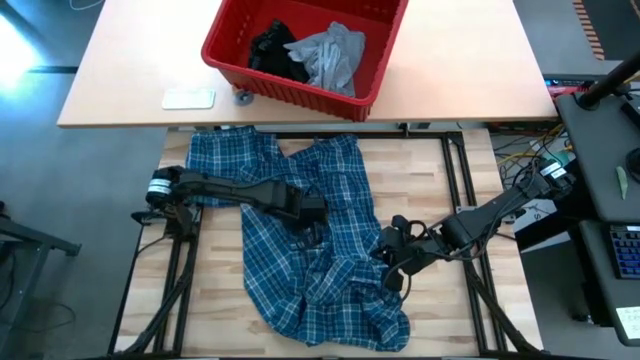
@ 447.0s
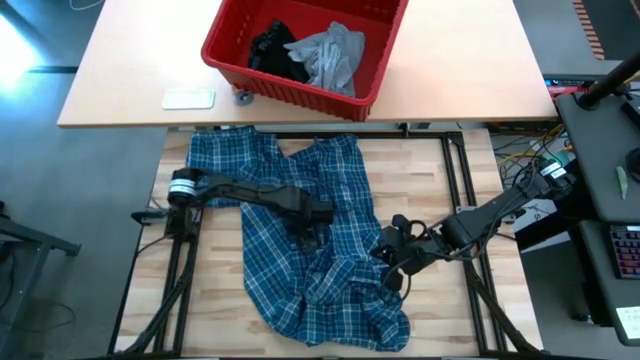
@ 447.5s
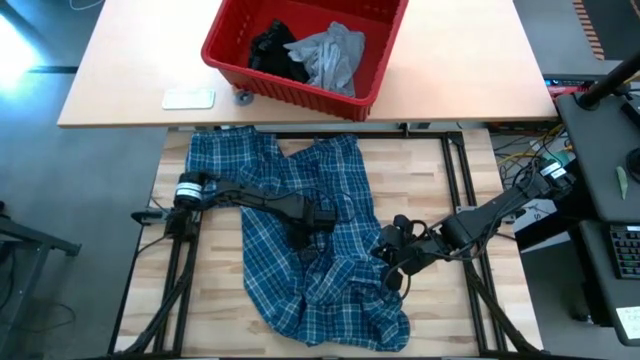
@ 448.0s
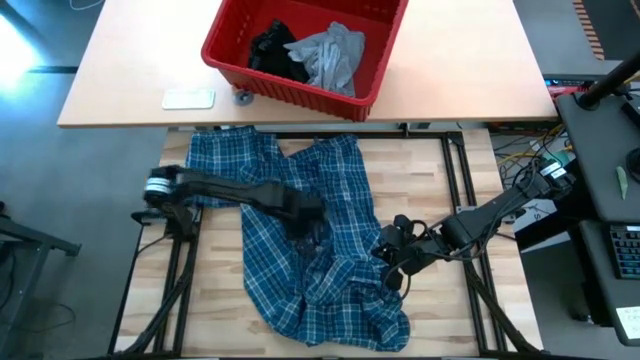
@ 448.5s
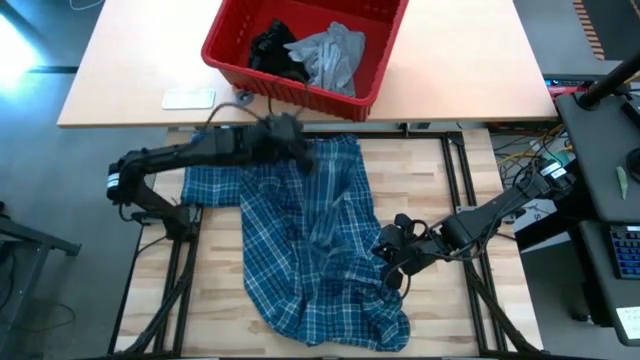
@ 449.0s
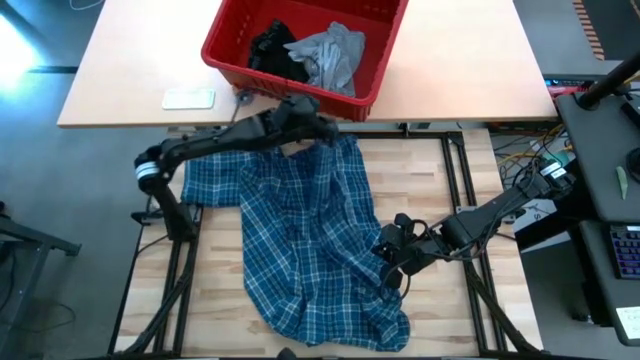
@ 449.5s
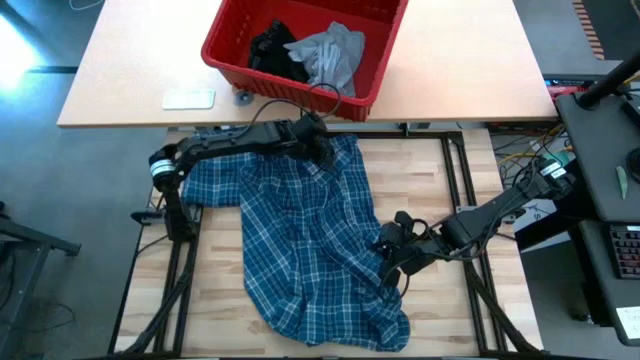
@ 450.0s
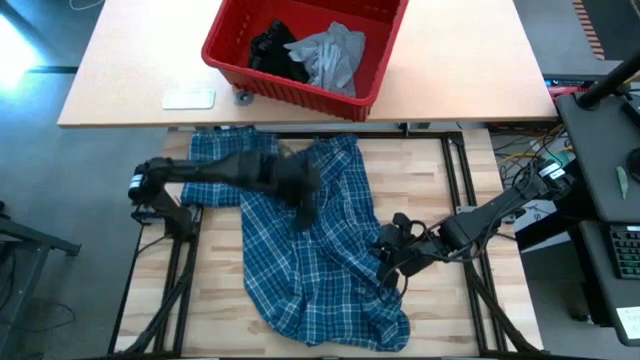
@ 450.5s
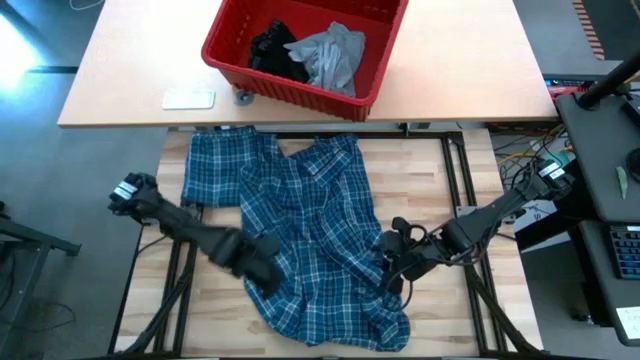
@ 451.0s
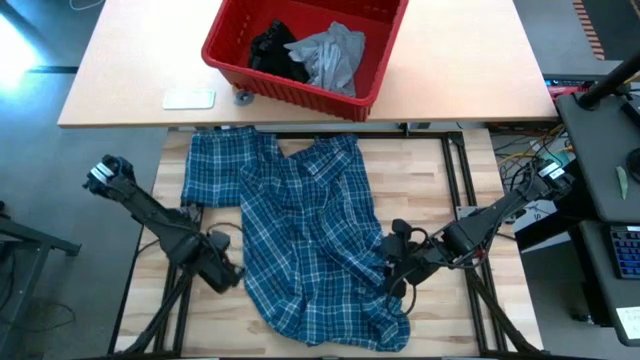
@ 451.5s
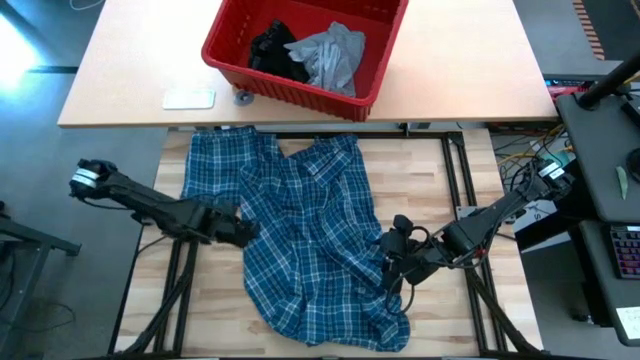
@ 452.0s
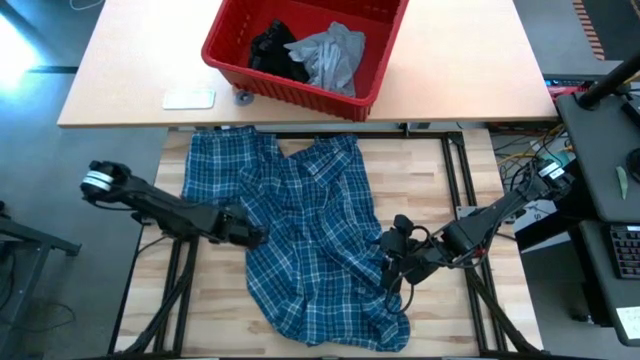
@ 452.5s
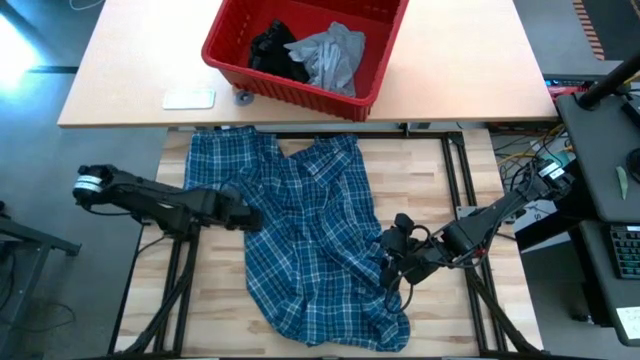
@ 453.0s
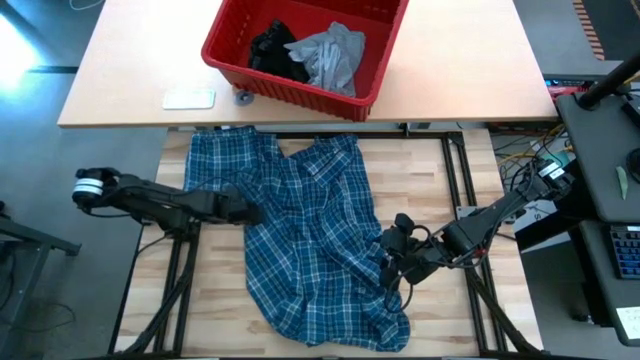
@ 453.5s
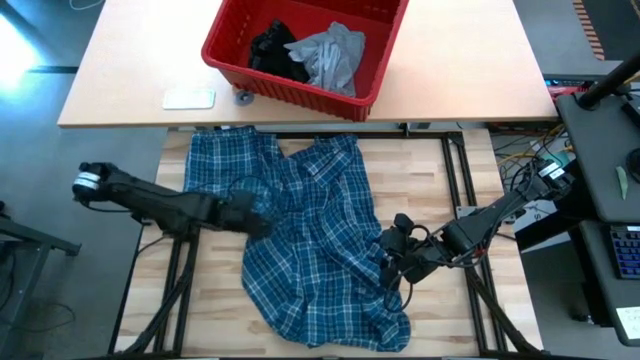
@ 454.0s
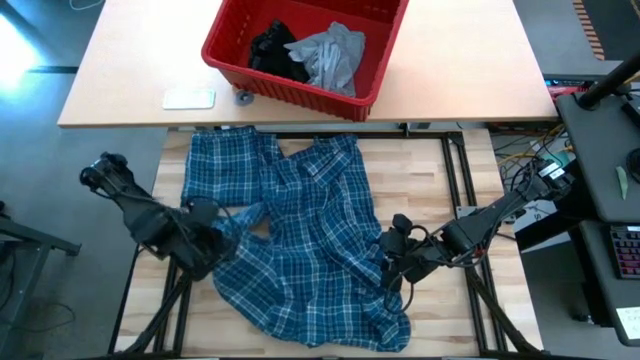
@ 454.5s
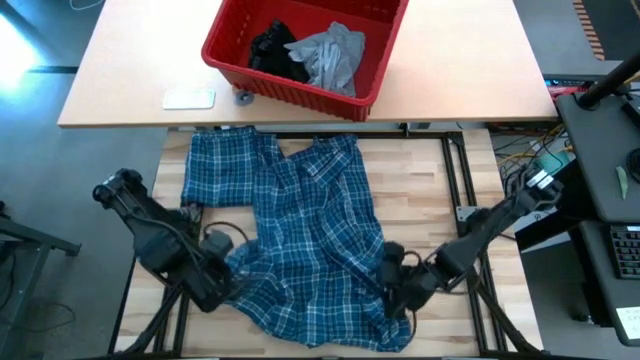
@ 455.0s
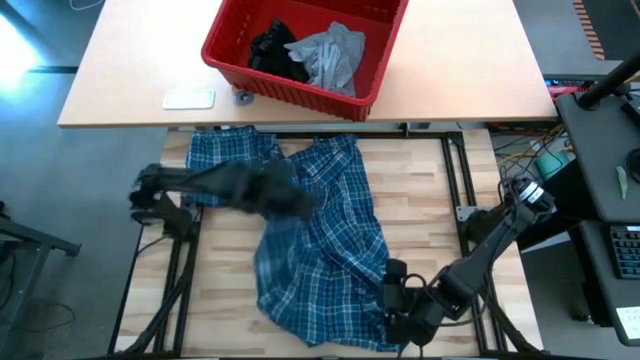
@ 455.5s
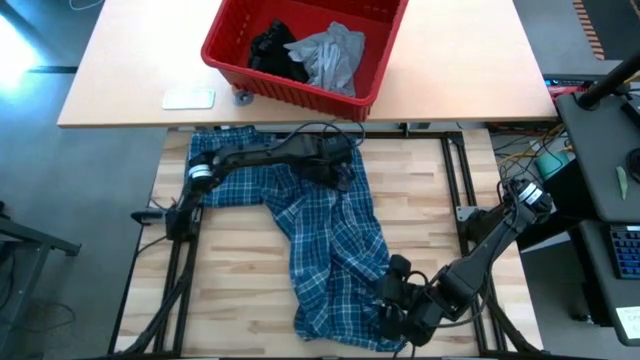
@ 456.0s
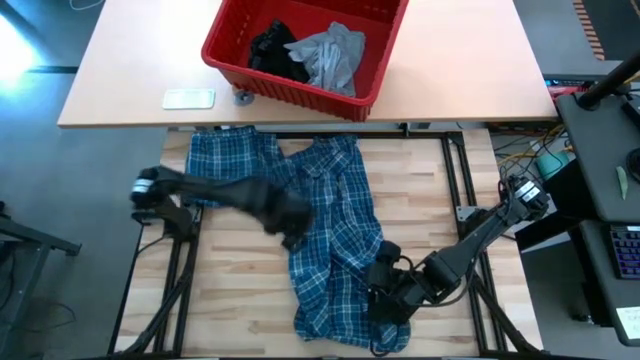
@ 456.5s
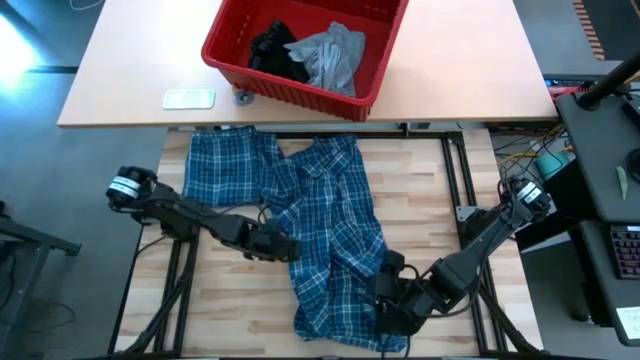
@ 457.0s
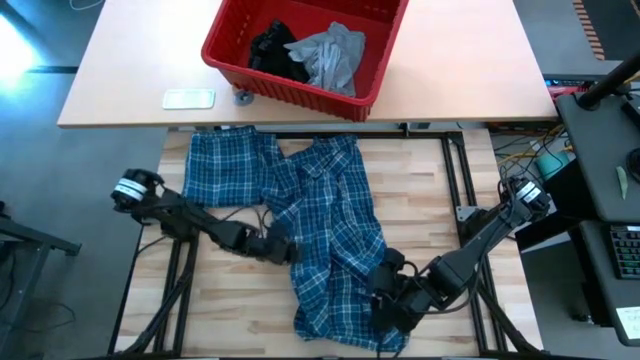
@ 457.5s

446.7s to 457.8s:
Task: Fold Laundry from Bin
Fold the blue patterned long sleeve shirt

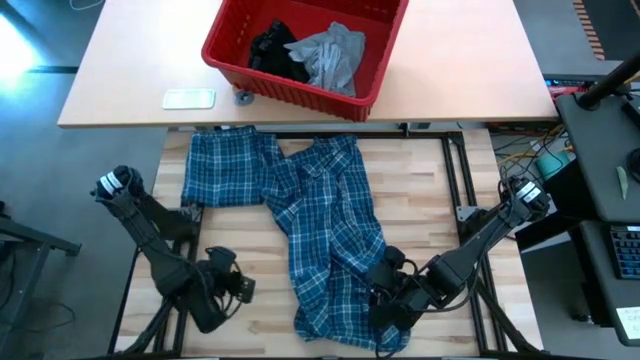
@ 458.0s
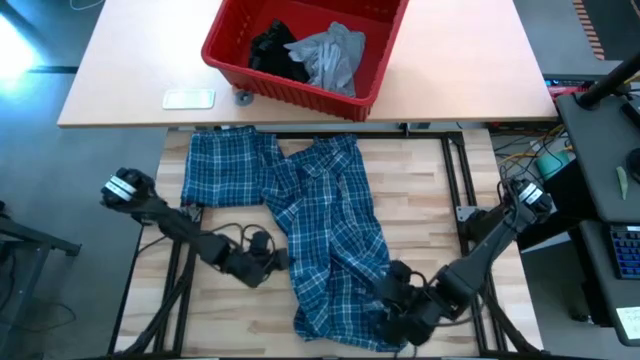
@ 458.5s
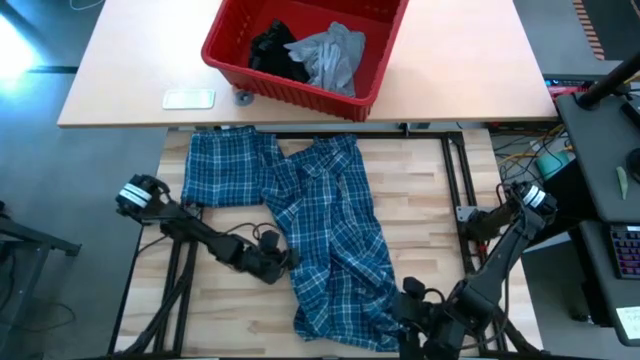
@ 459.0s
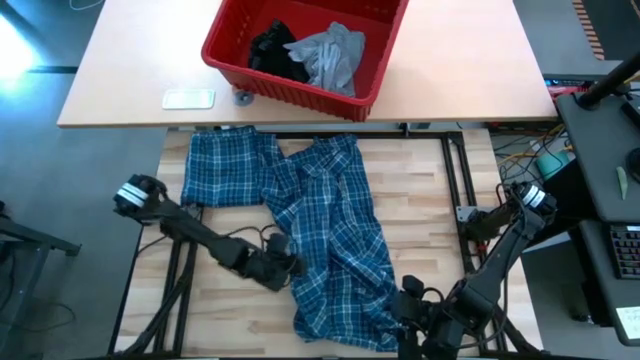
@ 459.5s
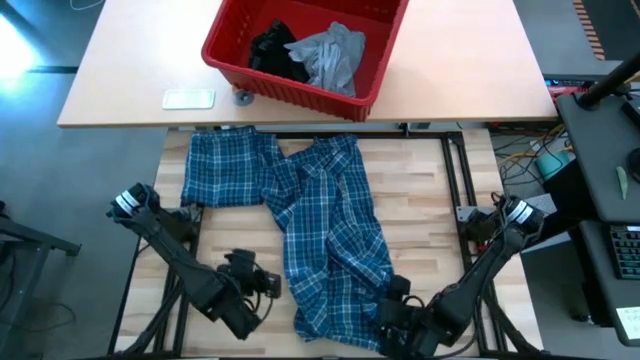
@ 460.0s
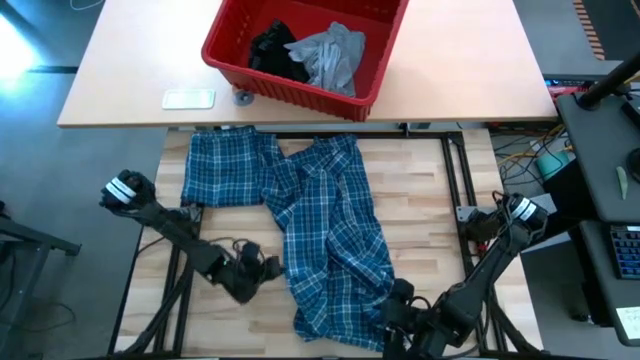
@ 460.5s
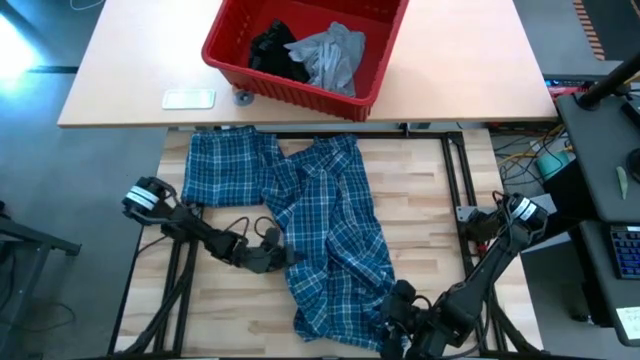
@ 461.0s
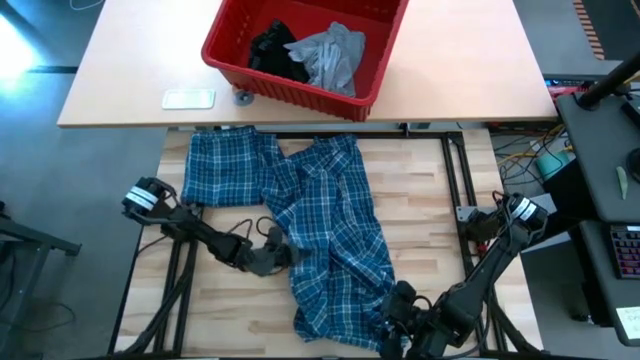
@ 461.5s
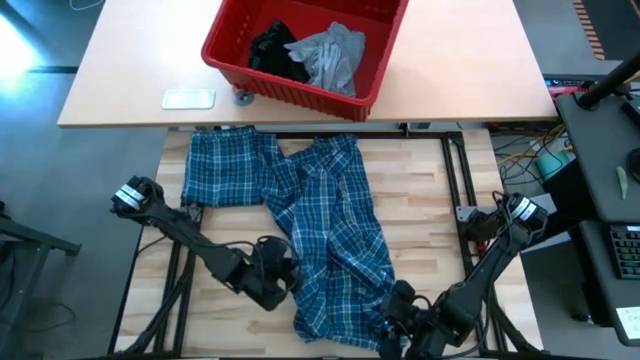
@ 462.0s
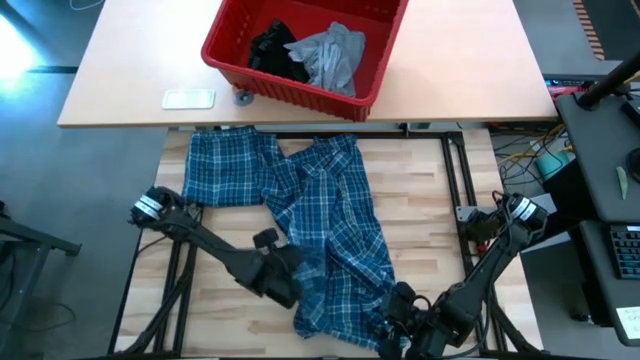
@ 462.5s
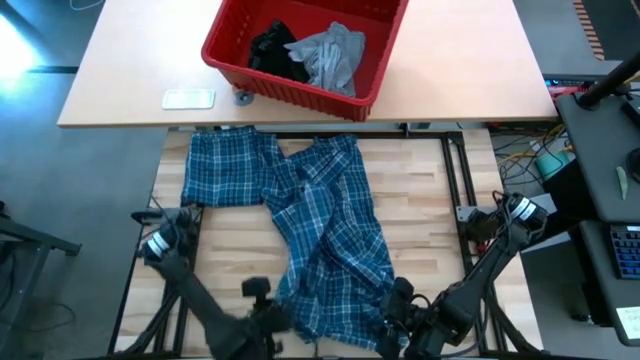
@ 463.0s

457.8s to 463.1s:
Fold the blue patterned long sleeve shirt

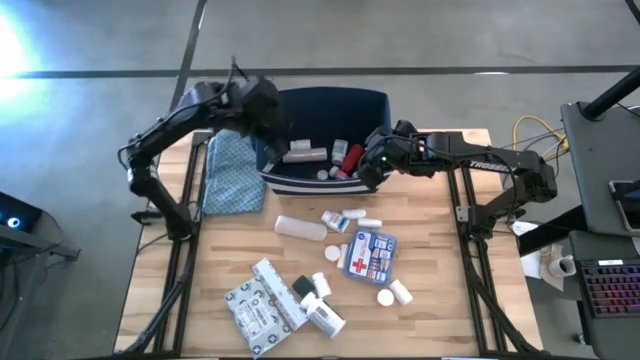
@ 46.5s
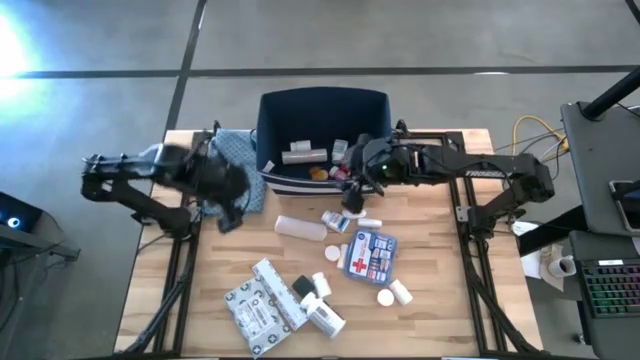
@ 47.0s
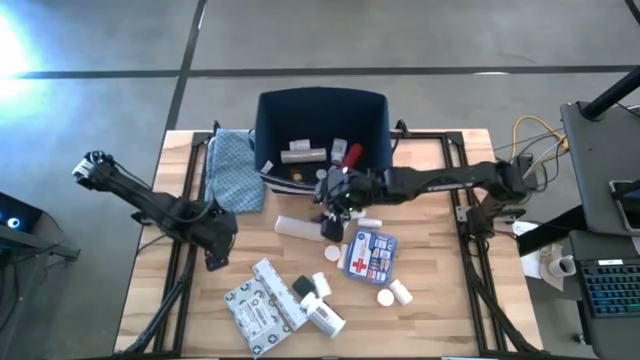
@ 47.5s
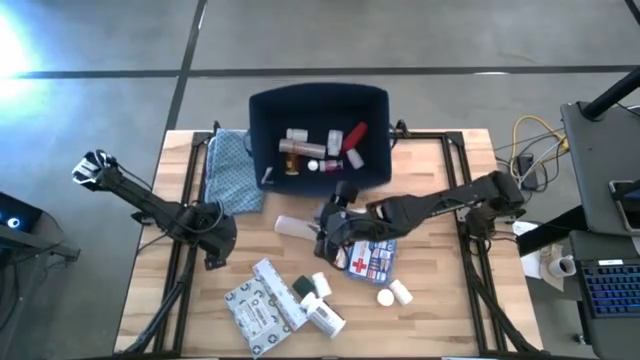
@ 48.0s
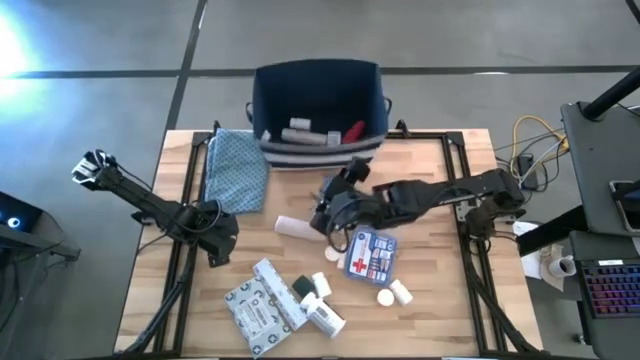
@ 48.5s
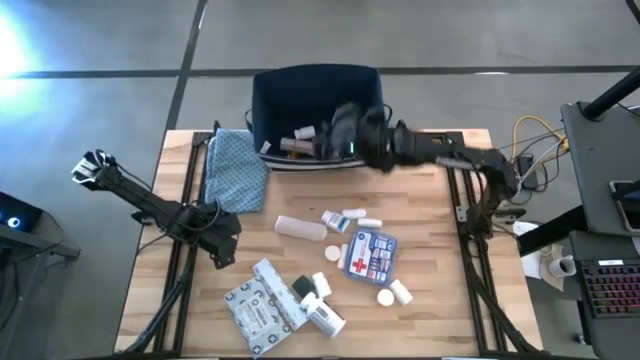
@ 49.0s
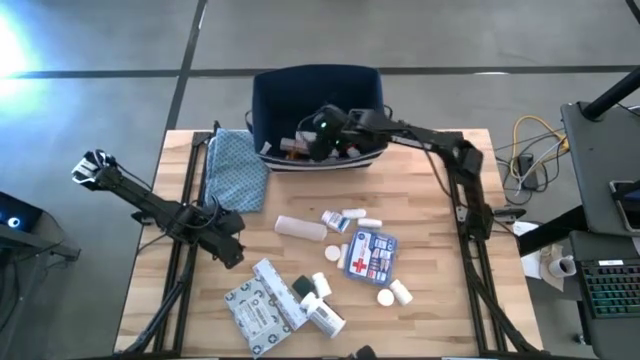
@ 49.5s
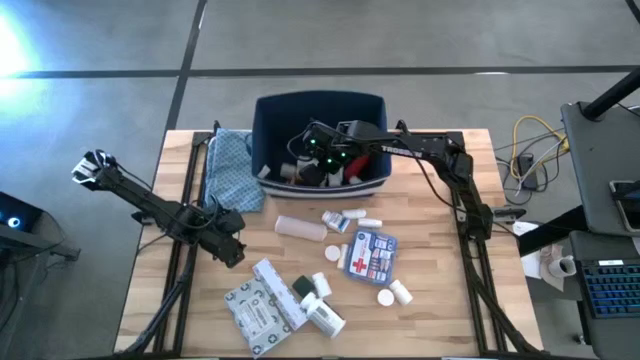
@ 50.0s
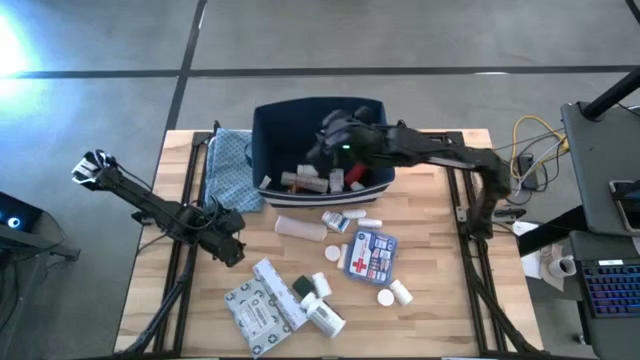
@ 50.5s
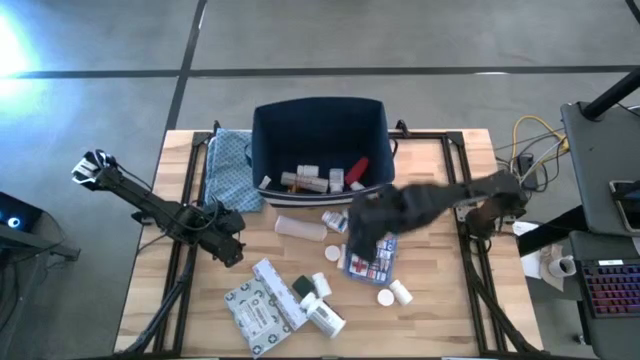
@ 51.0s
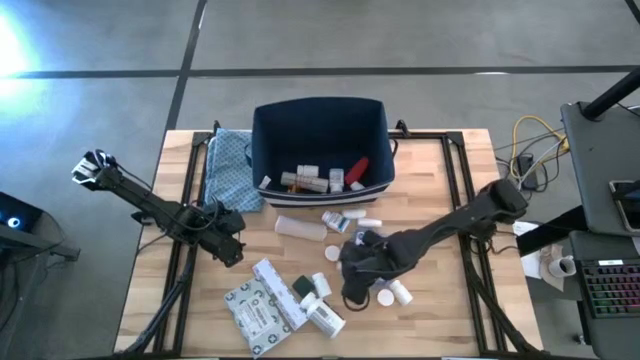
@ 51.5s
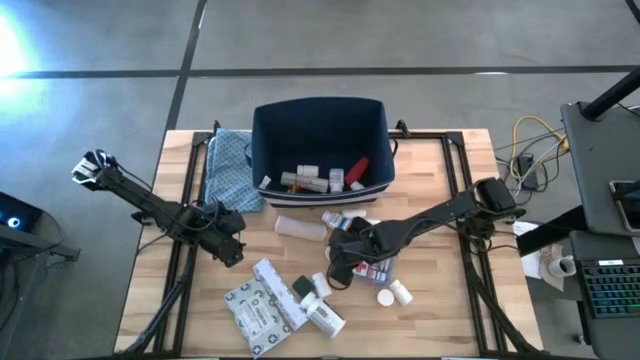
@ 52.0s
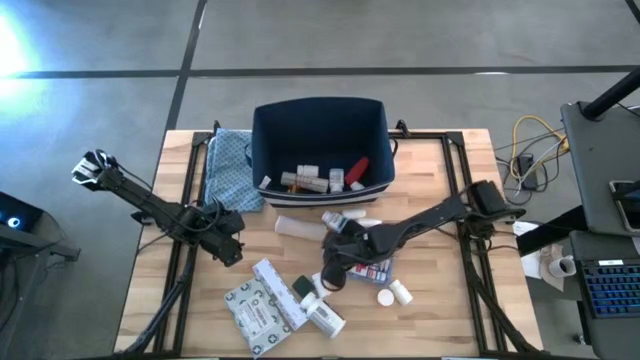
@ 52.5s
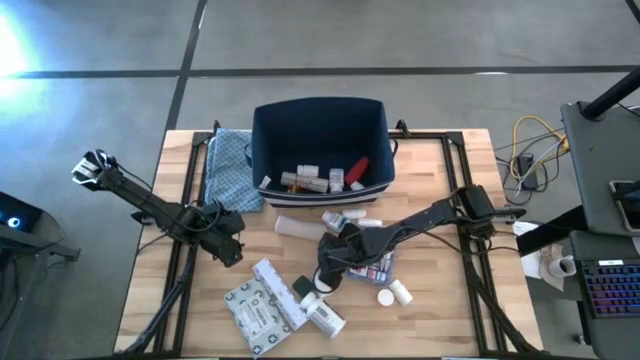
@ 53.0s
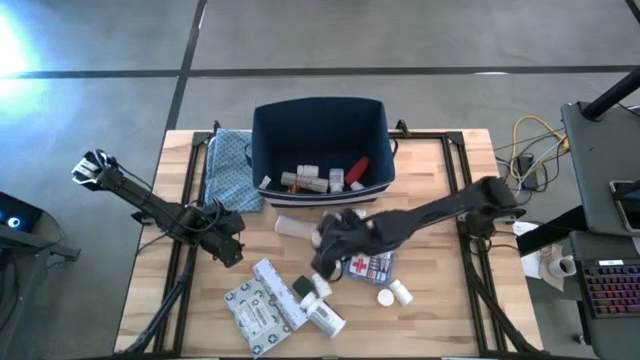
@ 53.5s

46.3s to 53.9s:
Task: Pick & place medical supplies in basket/bin
Put the orange pill bottle into the blue bin
